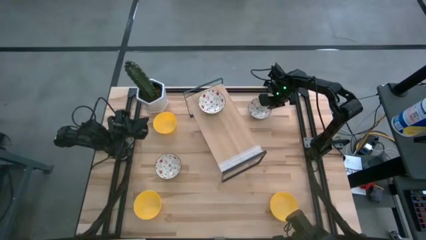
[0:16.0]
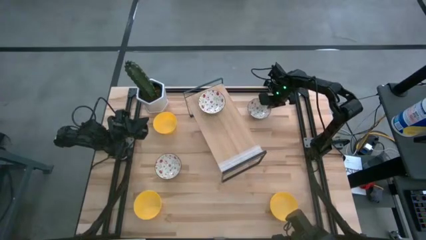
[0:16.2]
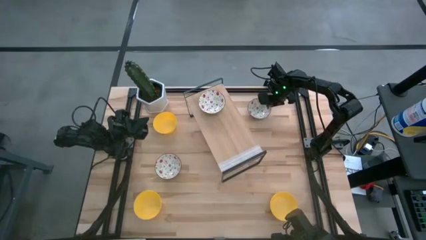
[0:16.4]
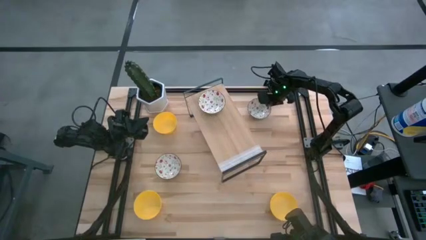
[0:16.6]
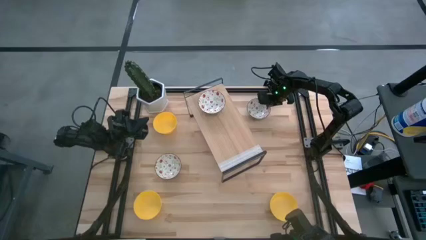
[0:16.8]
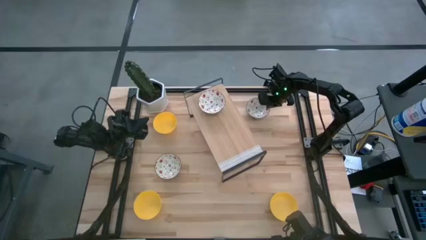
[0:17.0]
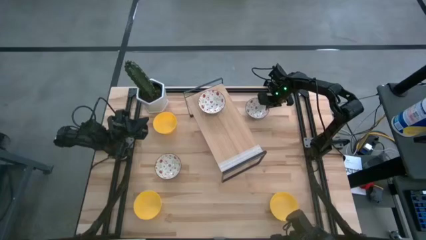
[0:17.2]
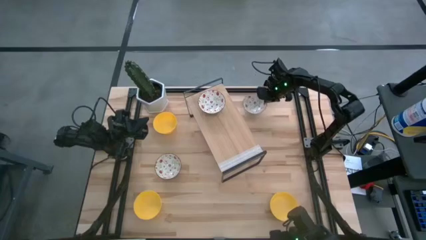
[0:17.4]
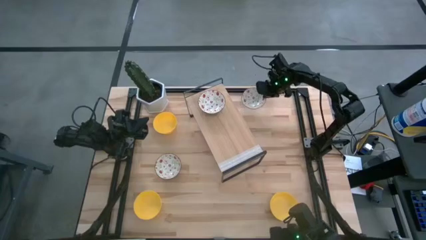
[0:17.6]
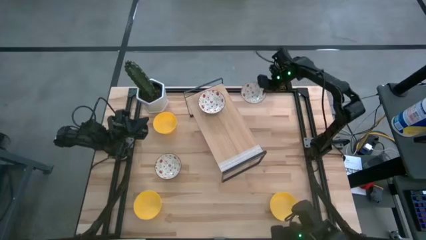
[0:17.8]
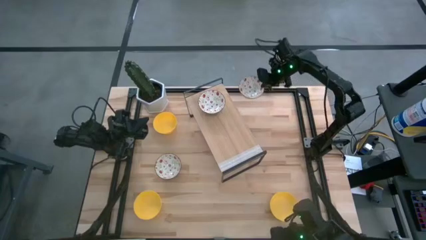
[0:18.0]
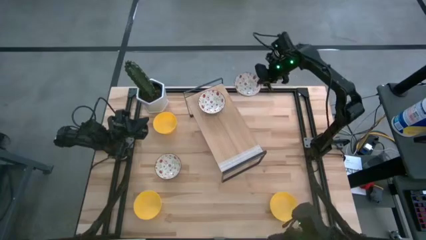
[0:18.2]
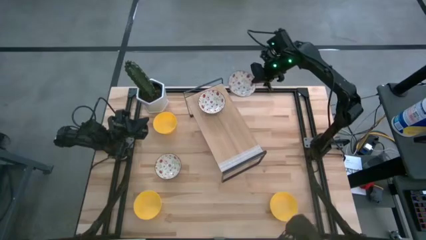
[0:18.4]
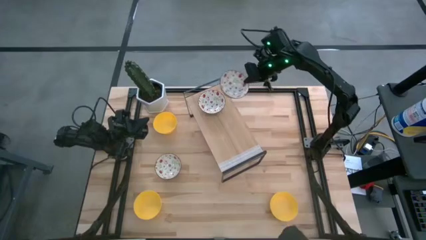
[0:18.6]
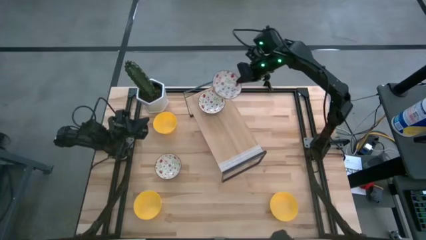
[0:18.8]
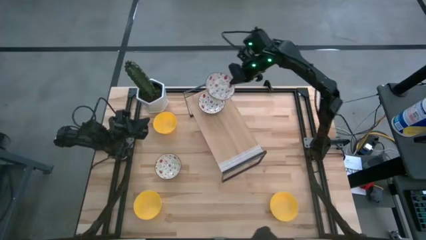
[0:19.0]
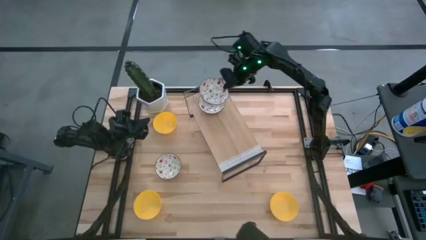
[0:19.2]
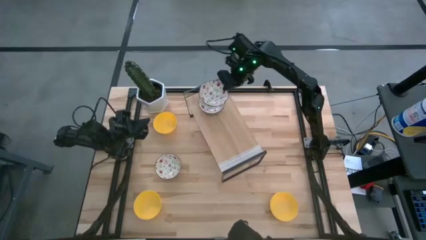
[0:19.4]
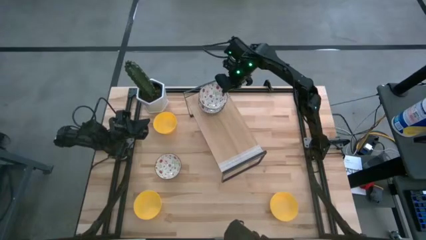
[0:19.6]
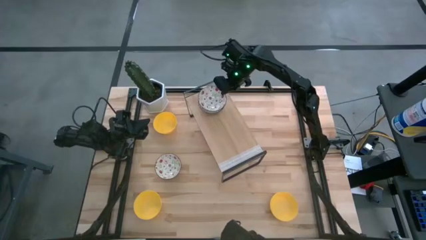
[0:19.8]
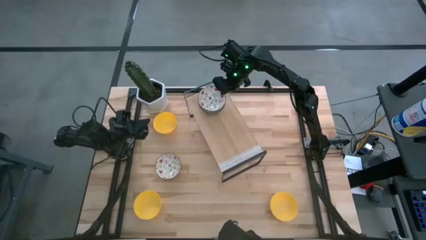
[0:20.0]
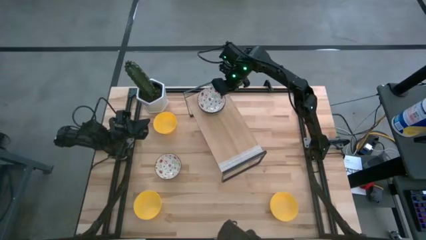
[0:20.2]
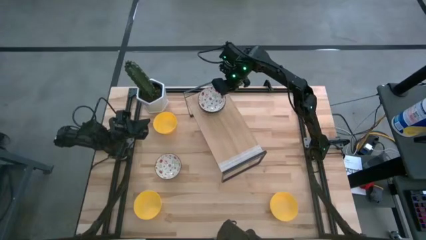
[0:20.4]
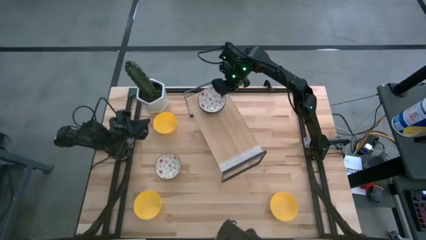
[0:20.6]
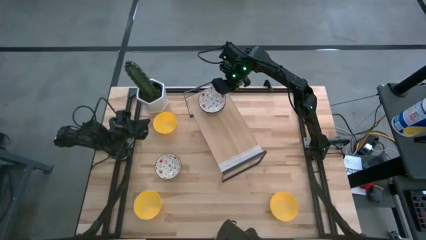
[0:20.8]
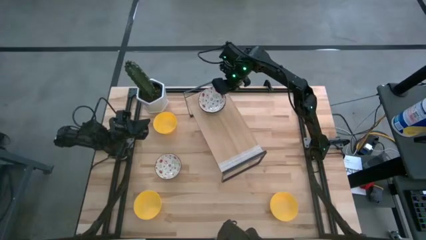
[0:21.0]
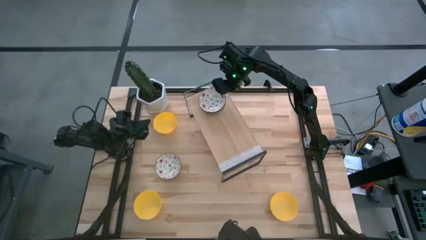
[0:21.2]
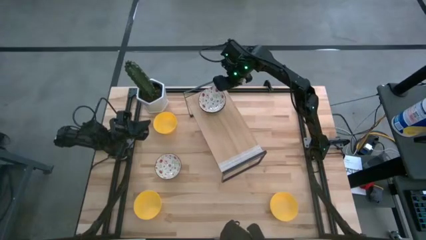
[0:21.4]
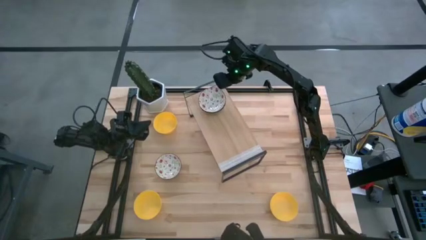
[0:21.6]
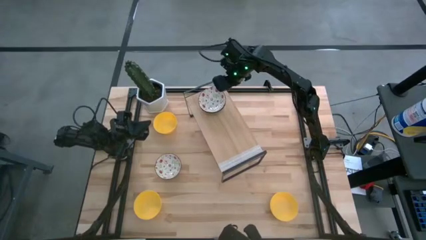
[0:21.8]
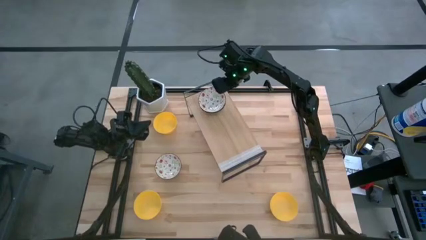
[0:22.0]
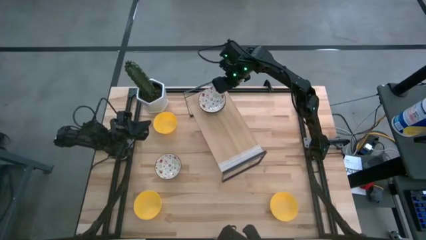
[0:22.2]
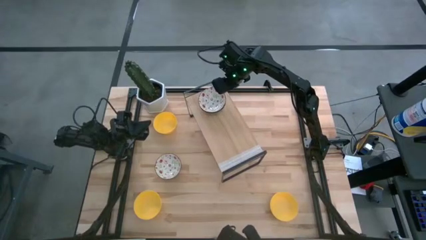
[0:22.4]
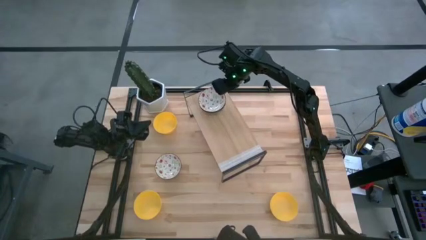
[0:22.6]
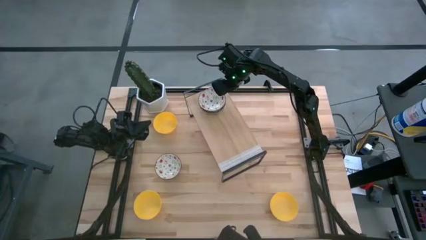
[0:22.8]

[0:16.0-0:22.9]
Task: Pick & Place Mini bowls
Stack the top white patterned bowl on the white patterned bowl on the shelf

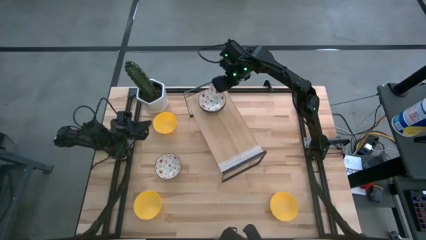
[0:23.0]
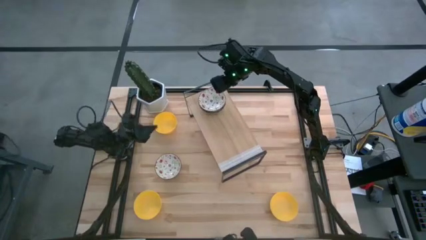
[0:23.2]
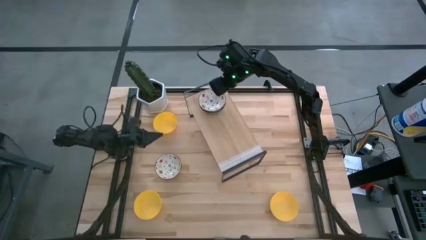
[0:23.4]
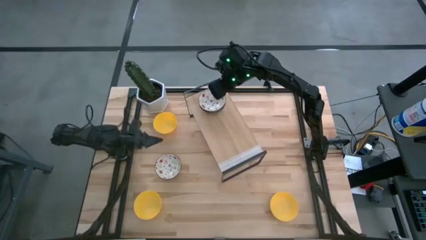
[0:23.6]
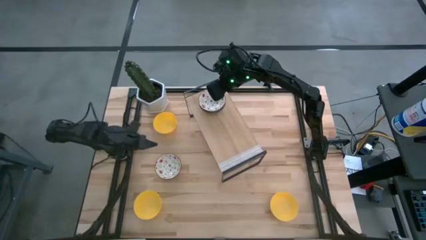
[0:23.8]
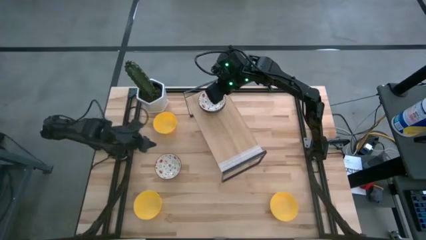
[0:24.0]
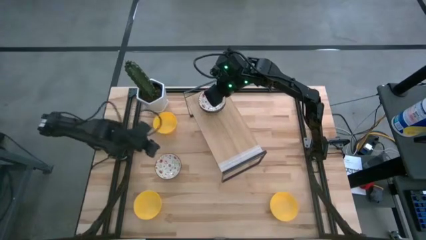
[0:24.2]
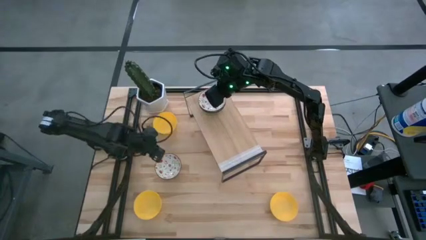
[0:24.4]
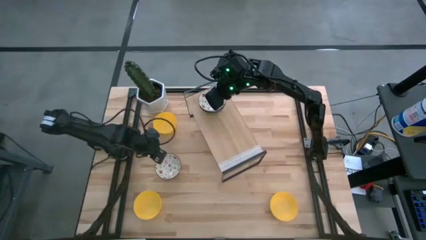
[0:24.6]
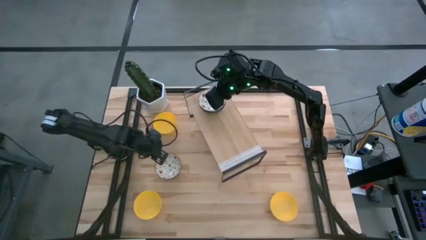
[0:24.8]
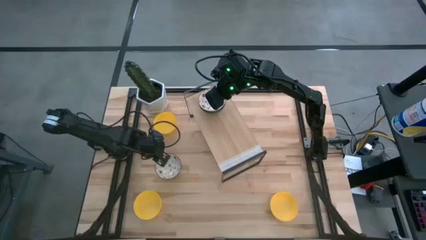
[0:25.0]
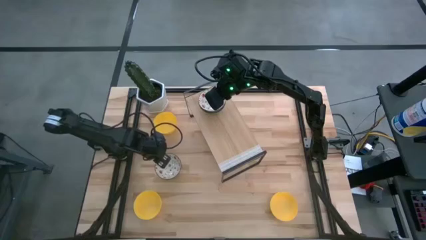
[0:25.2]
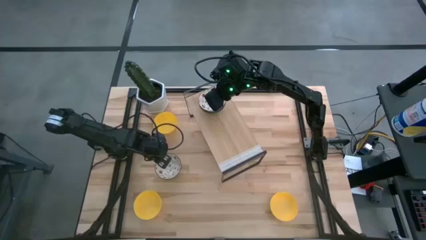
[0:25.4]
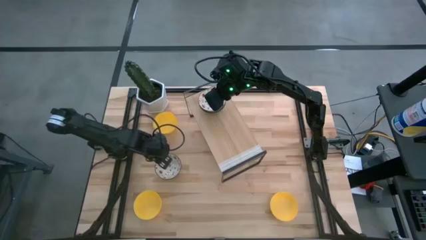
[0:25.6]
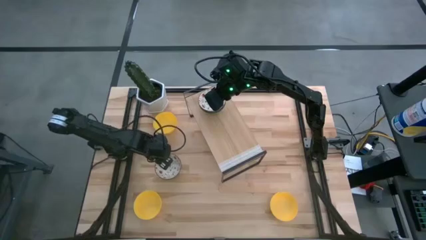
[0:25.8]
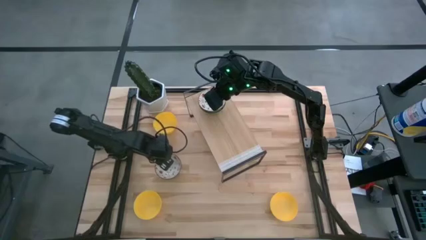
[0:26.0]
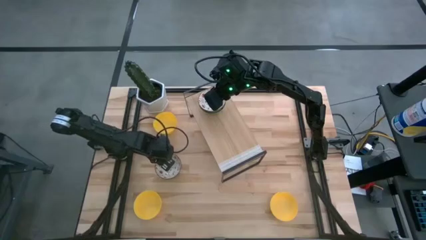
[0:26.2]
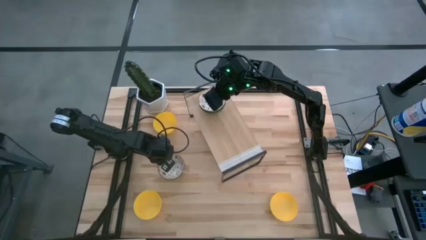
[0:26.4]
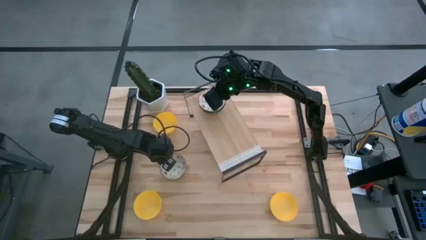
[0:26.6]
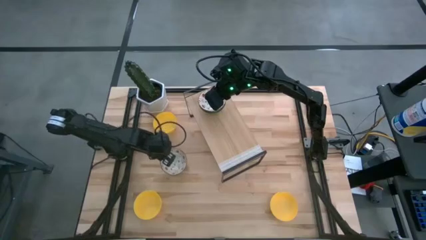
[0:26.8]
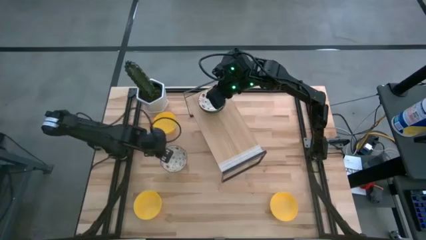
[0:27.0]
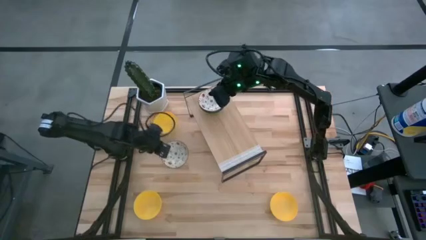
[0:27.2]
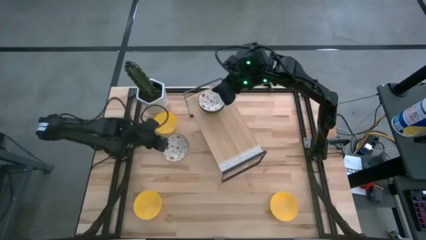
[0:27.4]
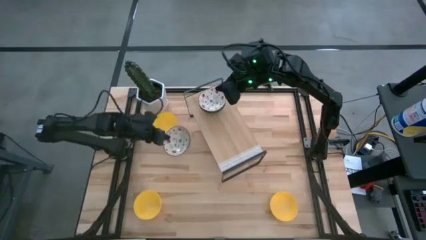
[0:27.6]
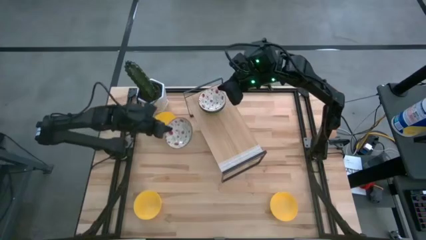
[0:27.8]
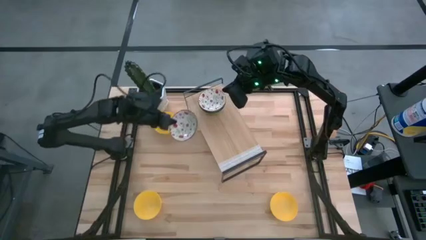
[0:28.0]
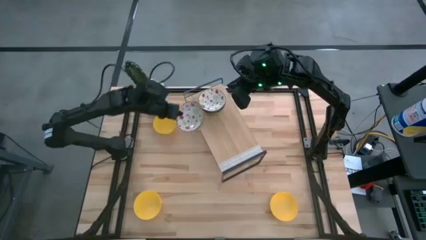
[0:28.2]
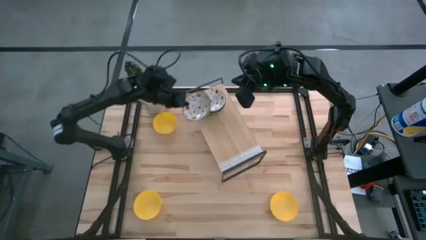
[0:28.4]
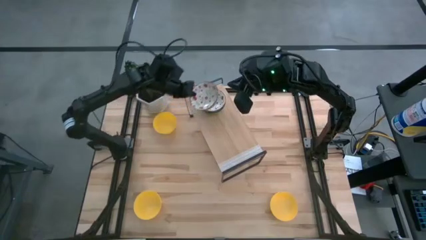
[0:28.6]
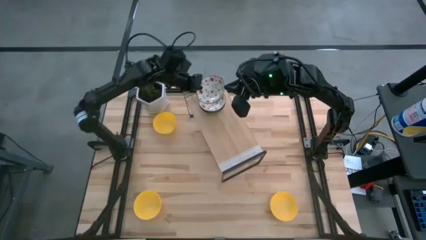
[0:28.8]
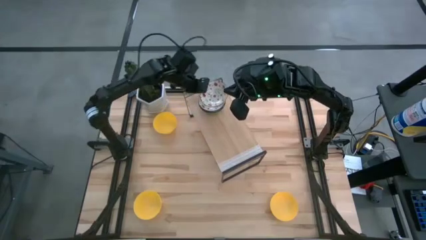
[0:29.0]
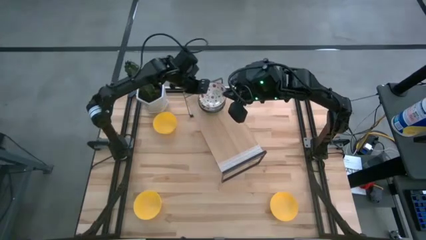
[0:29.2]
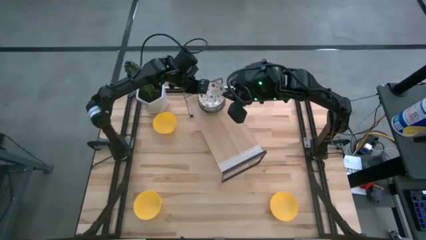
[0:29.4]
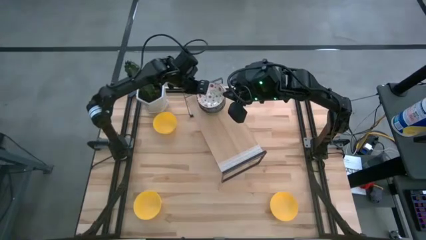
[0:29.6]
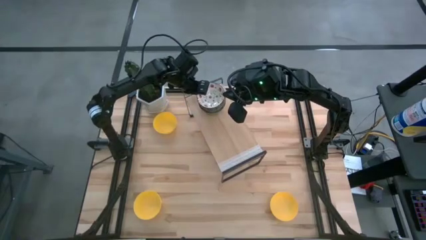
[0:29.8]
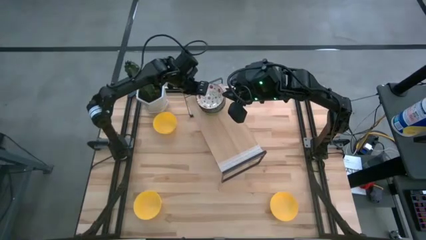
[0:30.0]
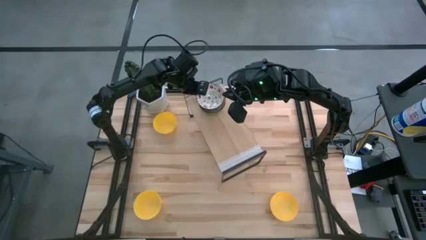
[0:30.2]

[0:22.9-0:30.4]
Stack the white patterned bowl on the stacked white patterned bowls on the shelf

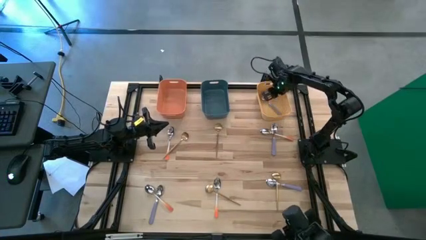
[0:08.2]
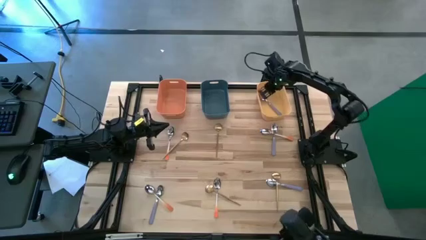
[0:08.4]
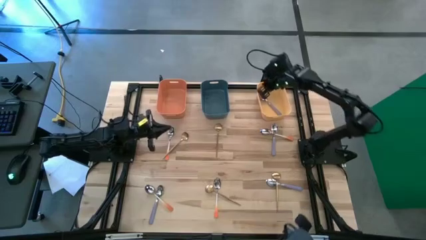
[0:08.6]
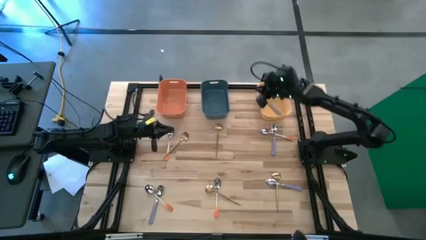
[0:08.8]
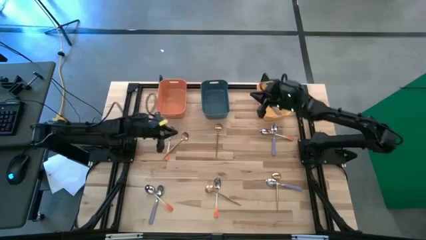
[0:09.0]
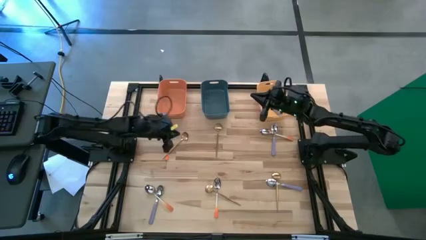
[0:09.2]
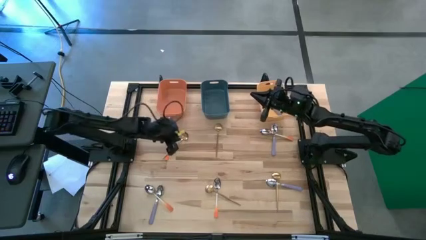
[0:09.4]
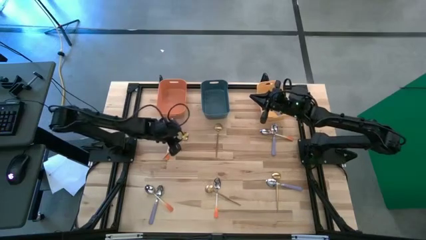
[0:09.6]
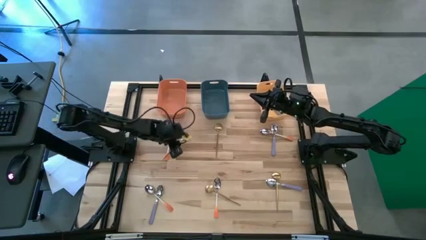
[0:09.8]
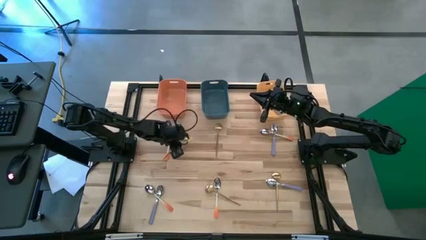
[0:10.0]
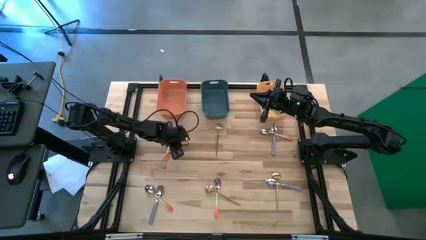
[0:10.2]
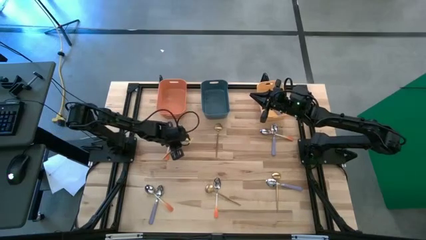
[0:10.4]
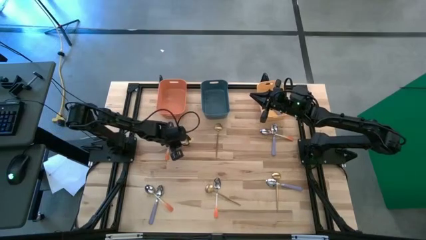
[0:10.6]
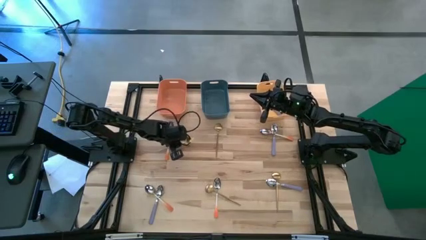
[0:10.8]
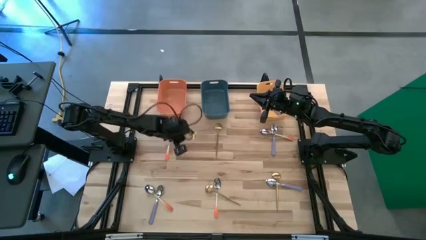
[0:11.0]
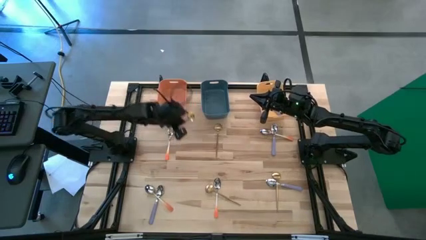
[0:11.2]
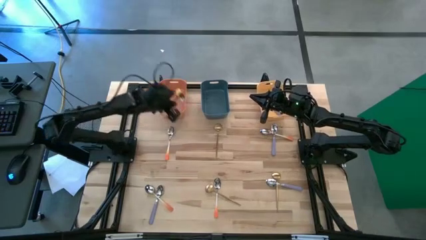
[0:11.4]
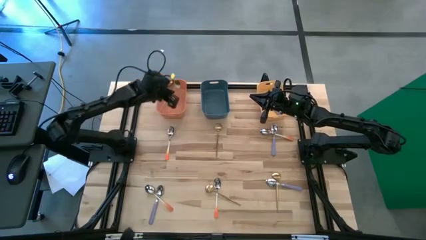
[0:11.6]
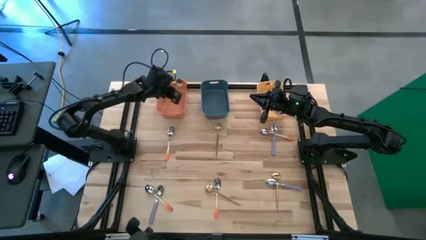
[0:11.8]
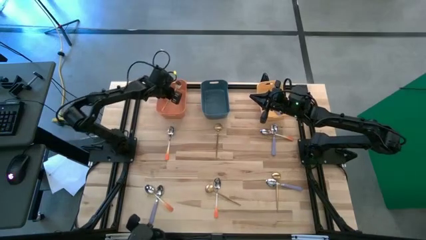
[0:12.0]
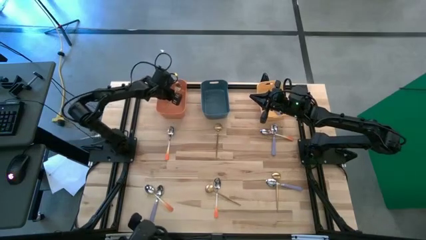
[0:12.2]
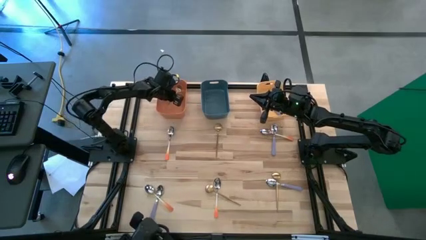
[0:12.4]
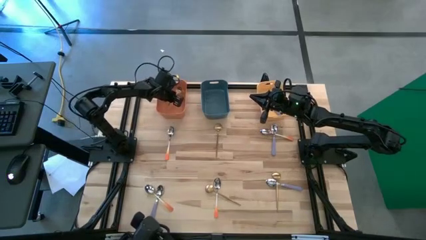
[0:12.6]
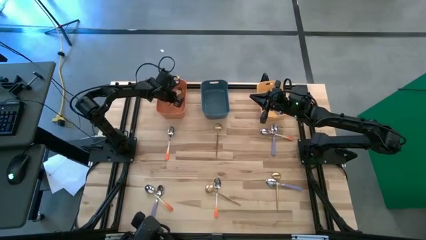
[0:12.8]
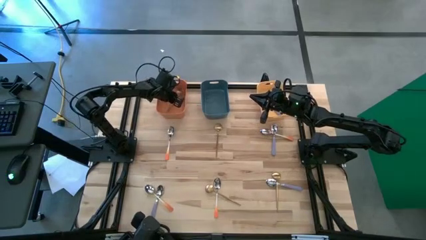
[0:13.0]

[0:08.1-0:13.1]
Task: Sort silverware by color (type)
Put the gold spoon into the orange bin
